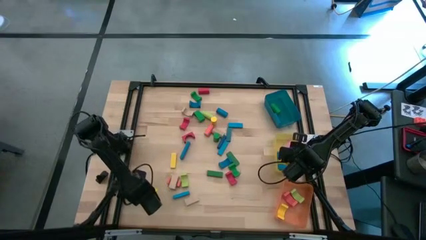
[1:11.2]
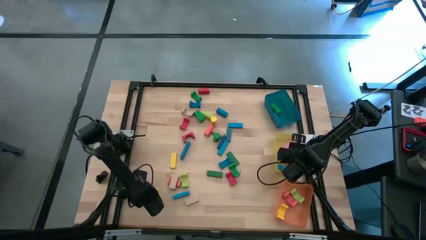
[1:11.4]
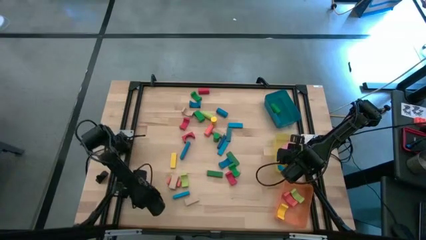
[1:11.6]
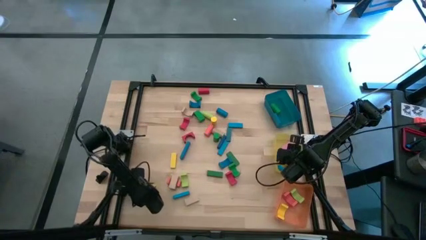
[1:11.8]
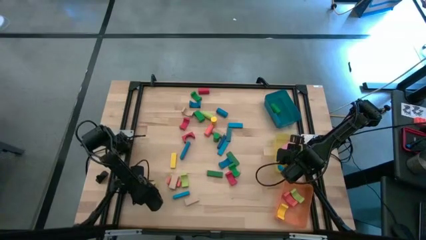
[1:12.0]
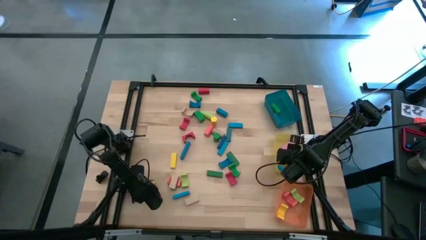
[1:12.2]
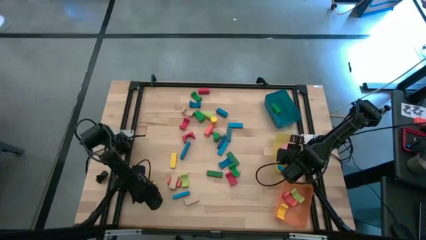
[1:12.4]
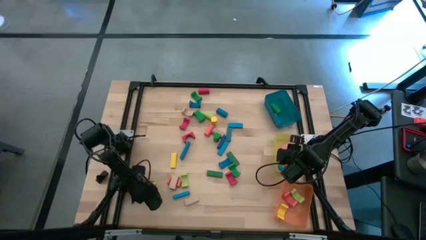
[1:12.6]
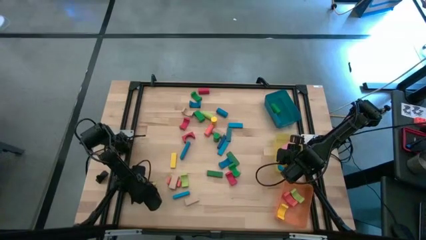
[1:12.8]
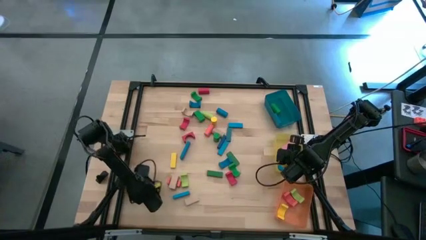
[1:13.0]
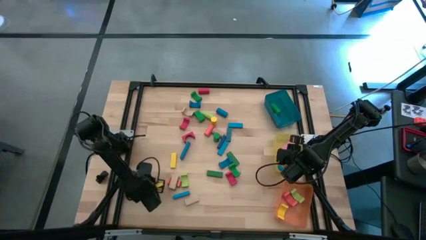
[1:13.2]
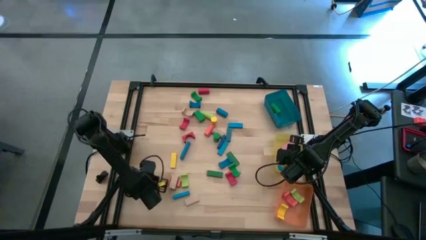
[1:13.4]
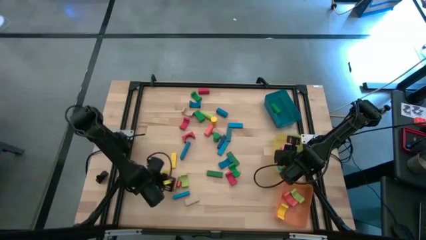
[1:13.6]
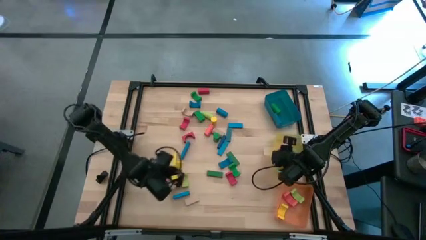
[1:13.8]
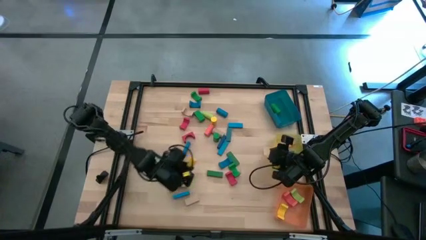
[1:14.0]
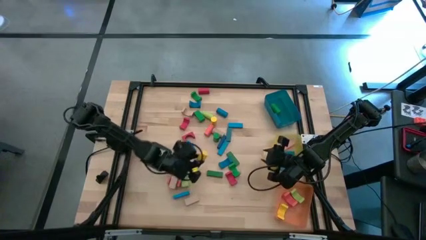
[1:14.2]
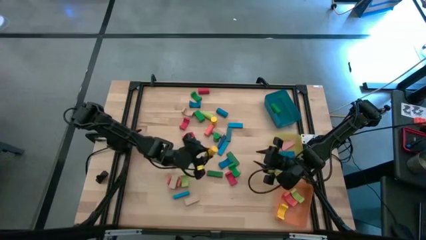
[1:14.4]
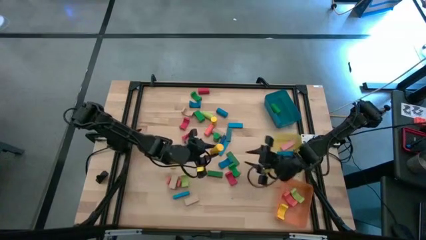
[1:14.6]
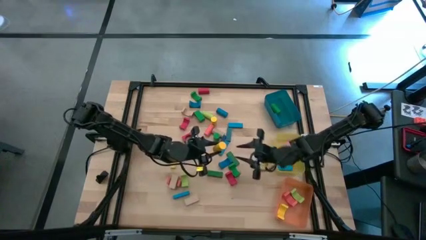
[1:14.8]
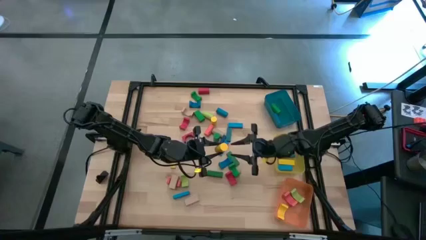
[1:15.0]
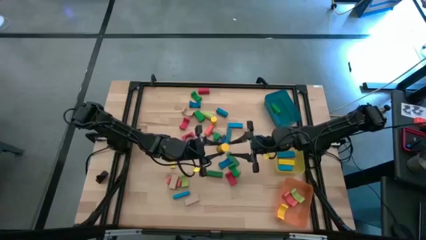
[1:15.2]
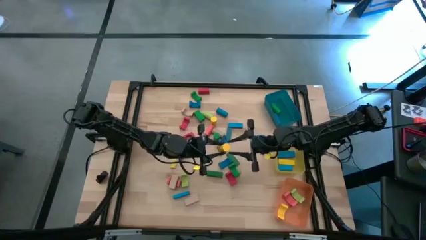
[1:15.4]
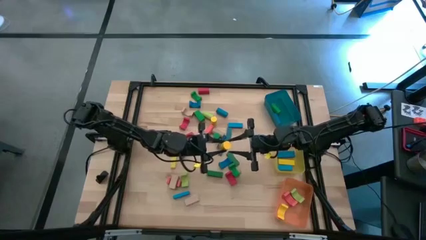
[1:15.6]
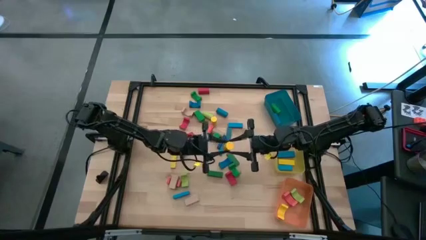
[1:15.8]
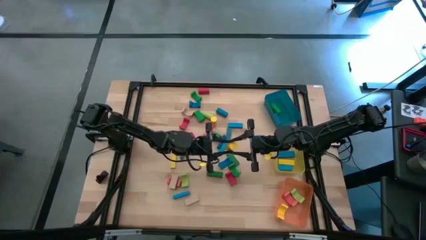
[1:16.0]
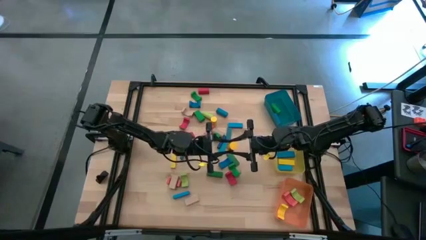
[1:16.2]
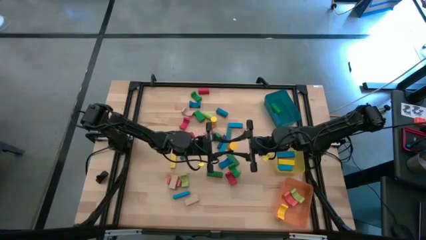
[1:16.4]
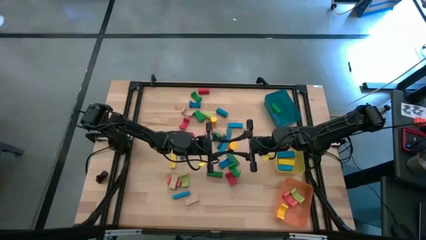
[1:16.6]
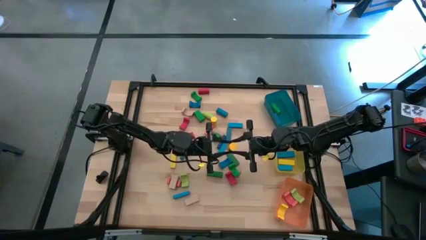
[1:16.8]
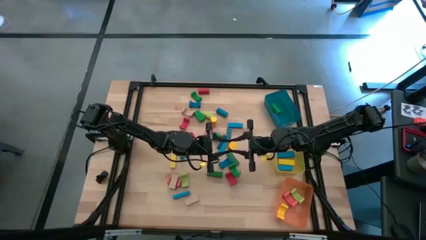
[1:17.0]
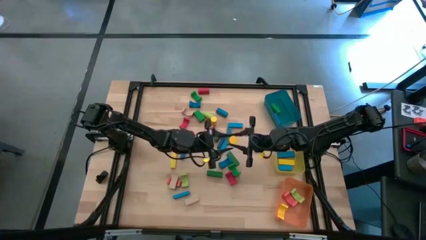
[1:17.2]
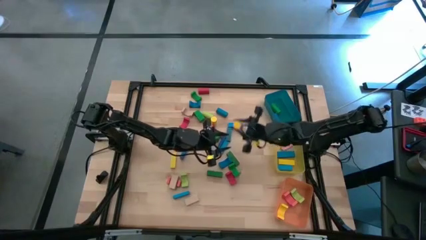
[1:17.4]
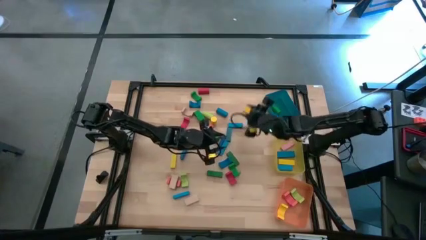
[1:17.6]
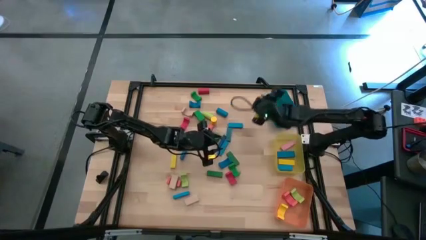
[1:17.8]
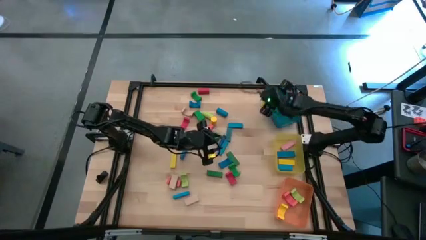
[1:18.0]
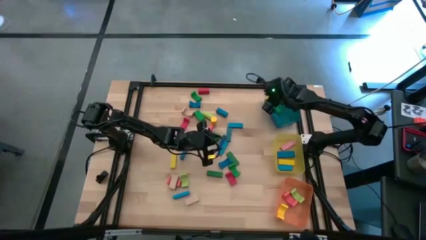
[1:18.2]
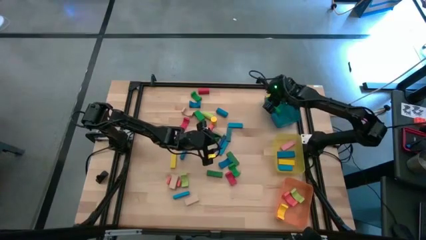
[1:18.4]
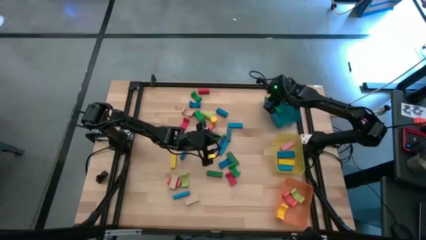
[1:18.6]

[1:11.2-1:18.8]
Task: Sort blocks by size
Put the yellow cylindrical block into the blue bin

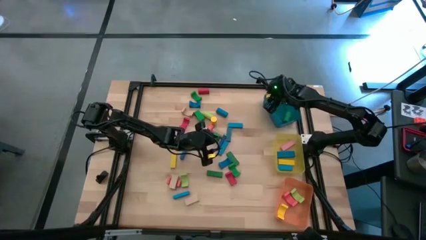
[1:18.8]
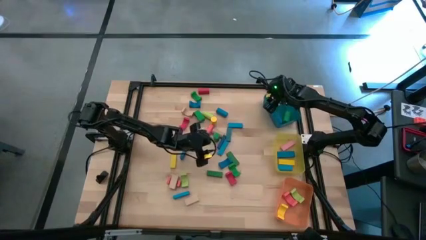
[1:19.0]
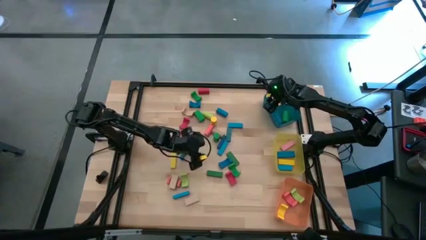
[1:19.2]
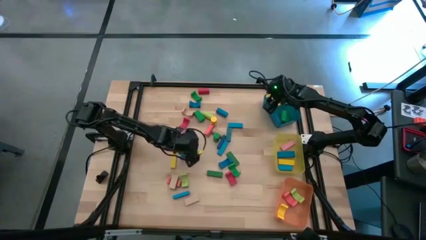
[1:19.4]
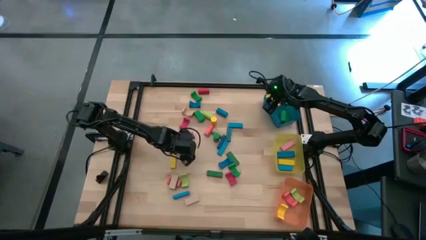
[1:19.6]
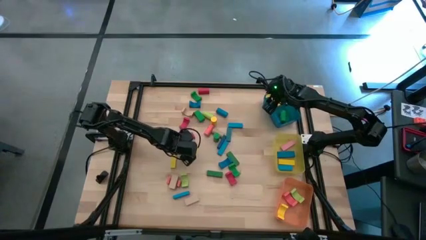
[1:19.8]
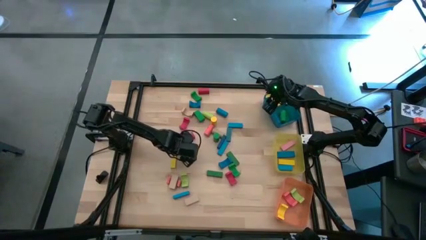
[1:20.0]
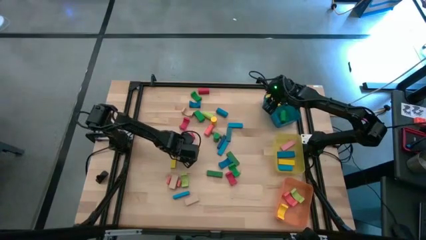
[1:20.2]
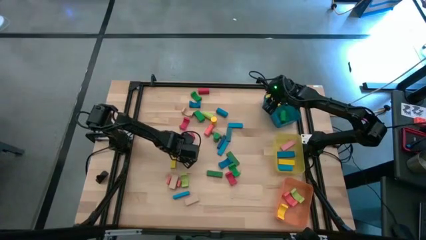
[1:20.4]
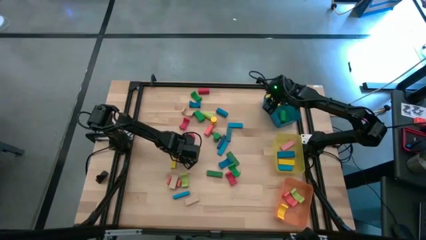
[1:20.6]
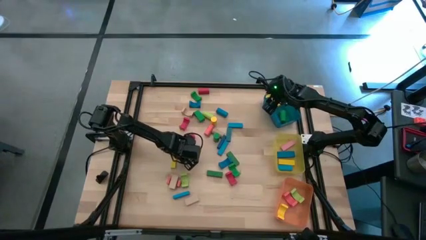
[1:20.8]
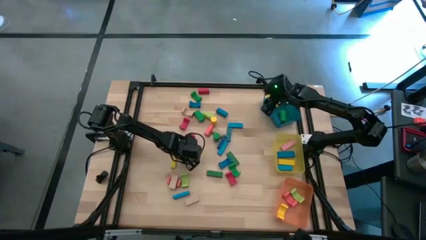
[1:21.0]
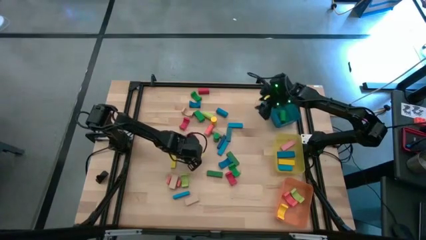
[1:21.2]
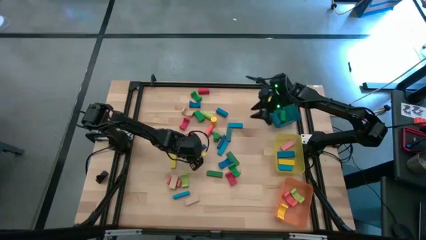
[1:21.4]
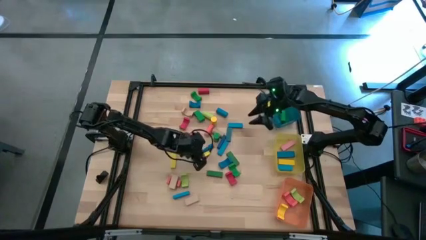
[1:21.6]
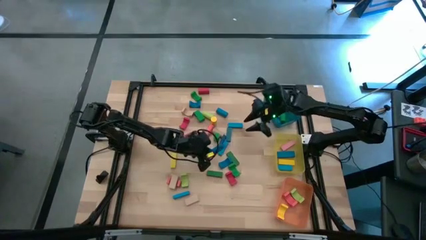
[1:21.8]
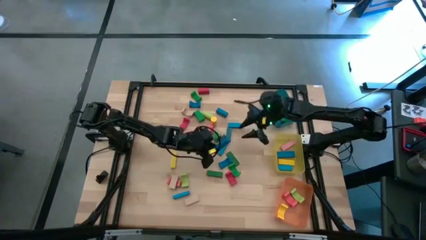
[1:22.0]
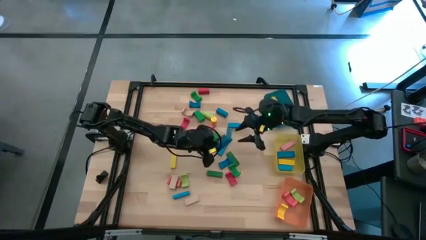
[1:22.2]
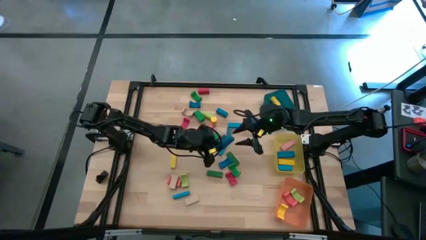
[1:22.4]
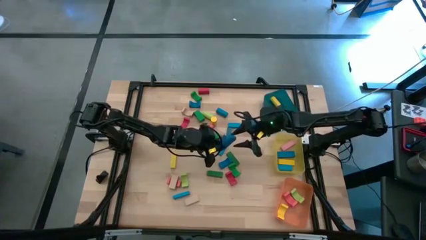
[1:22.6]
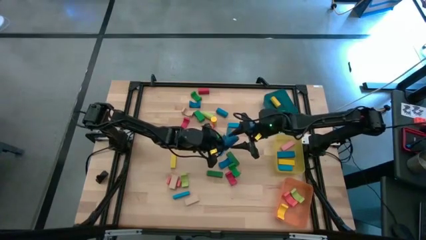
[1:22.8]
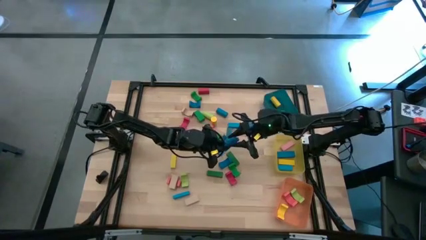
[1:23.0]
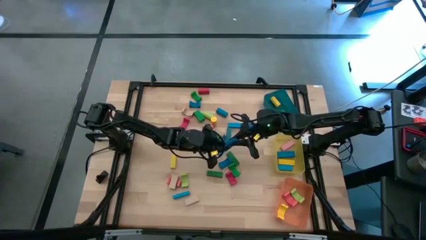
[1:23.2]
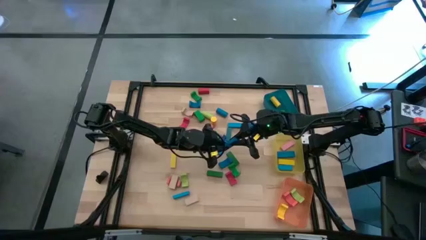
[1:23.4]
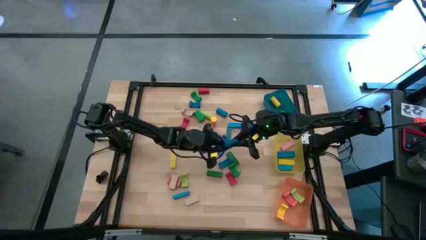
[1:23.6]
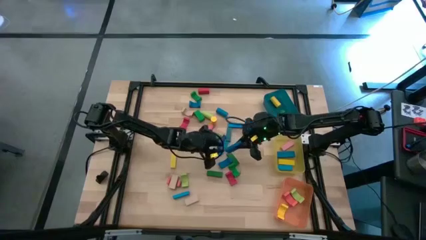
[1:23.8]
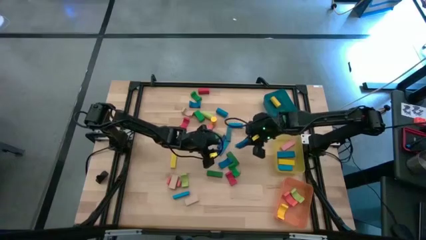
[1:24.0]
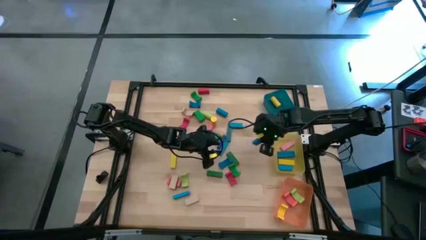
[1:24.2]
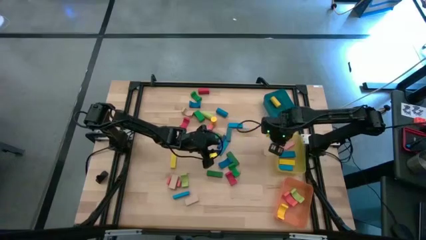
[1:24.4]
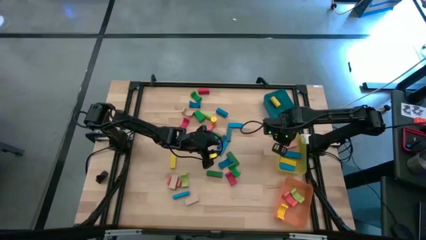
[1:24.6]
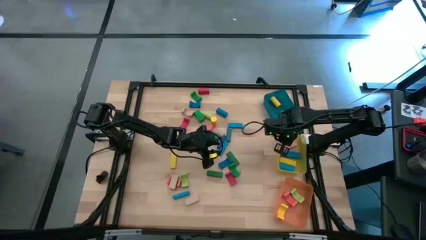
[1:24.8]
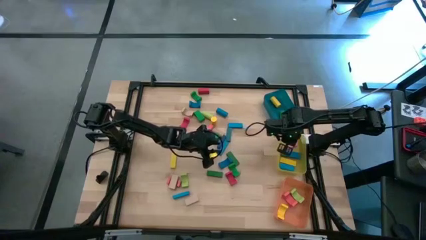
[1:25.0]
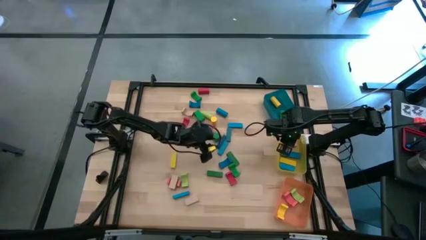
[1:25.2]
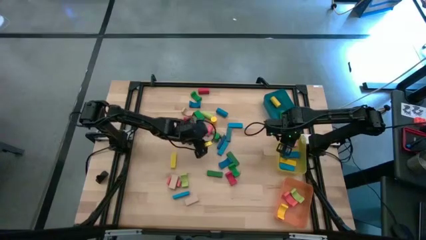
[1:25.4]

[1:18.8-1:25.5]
Put the blue rectangular block into the yellow bin
